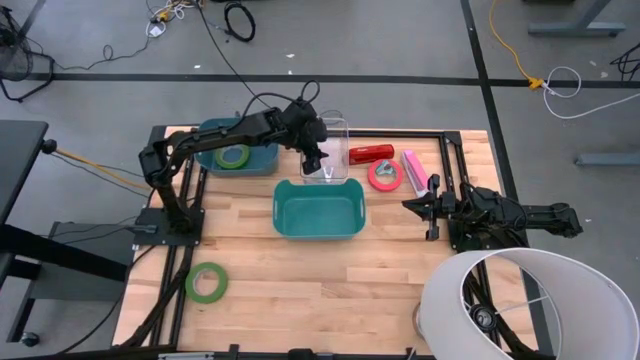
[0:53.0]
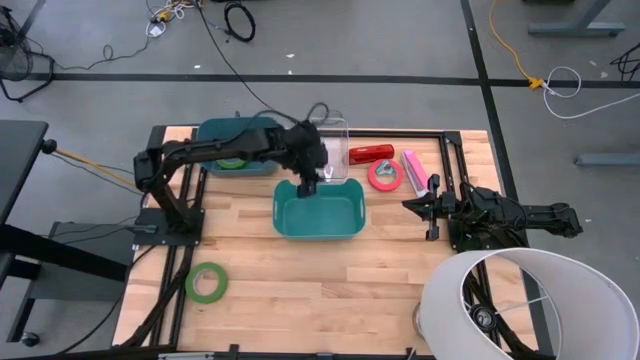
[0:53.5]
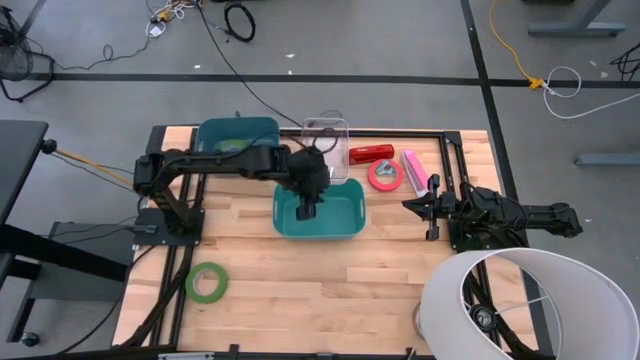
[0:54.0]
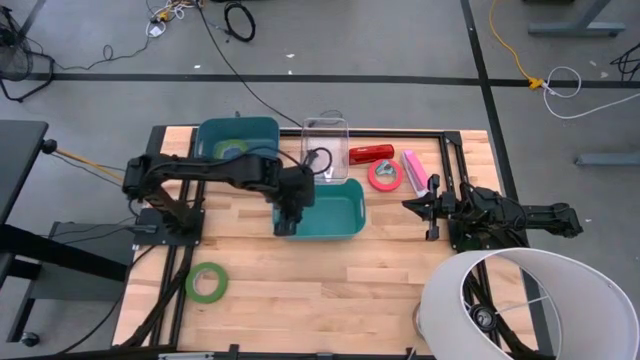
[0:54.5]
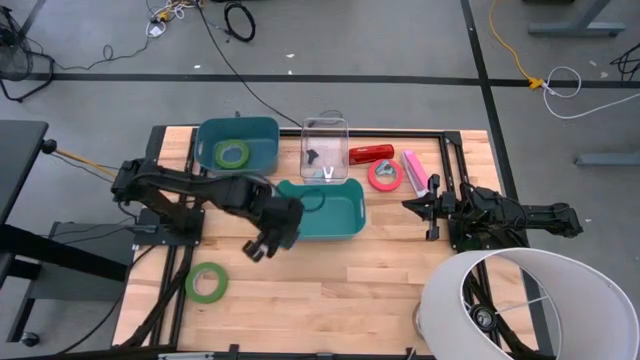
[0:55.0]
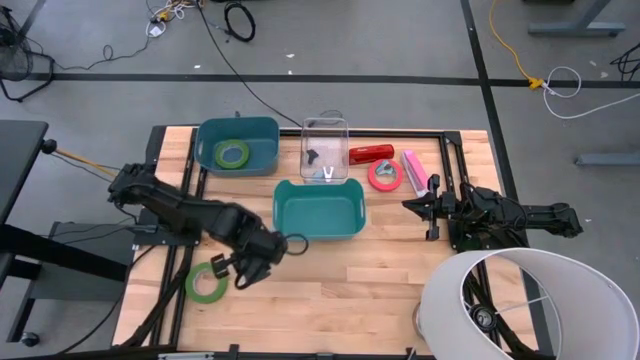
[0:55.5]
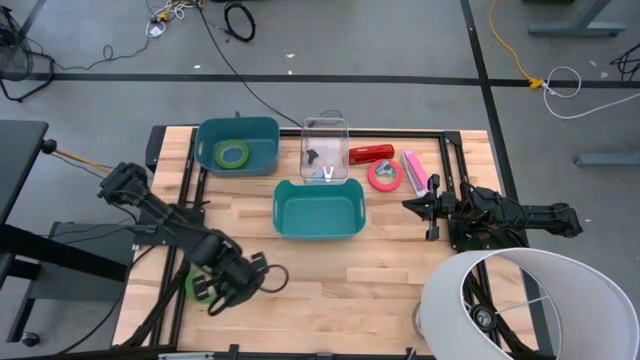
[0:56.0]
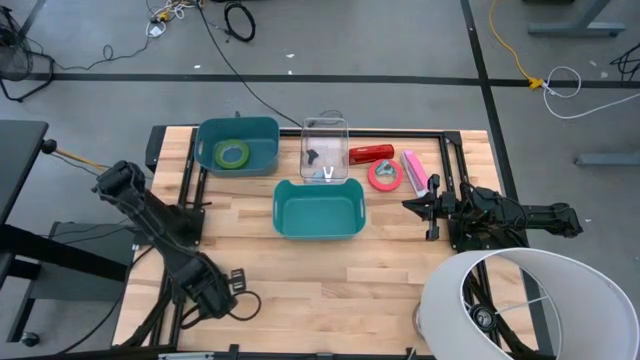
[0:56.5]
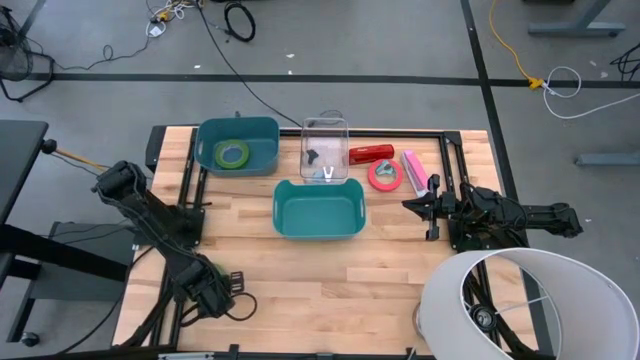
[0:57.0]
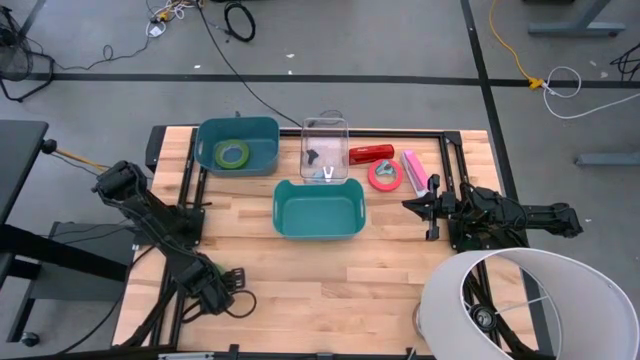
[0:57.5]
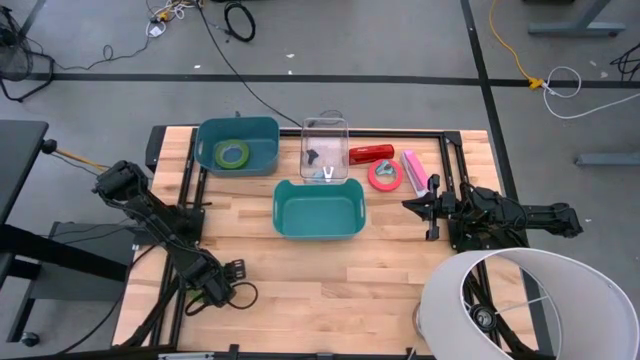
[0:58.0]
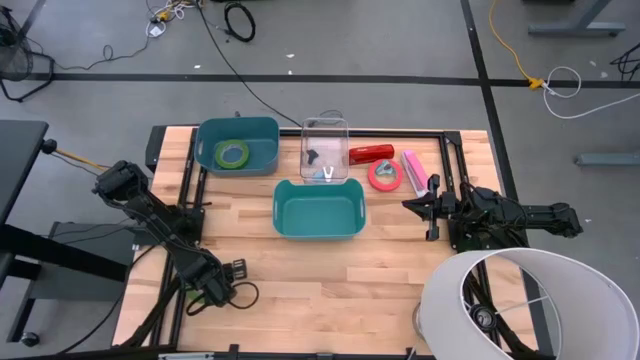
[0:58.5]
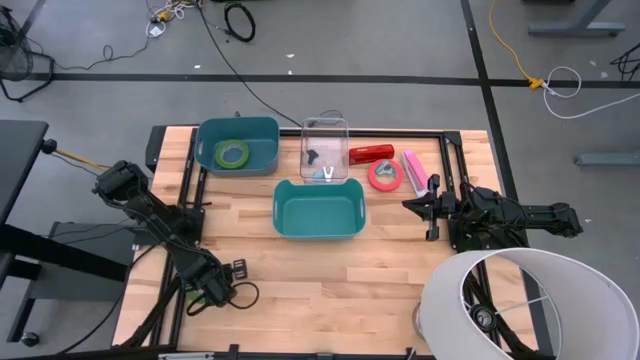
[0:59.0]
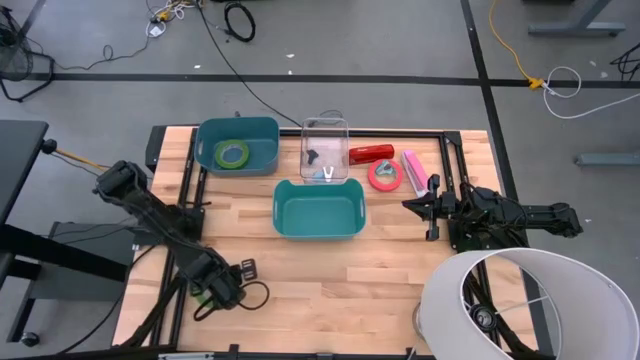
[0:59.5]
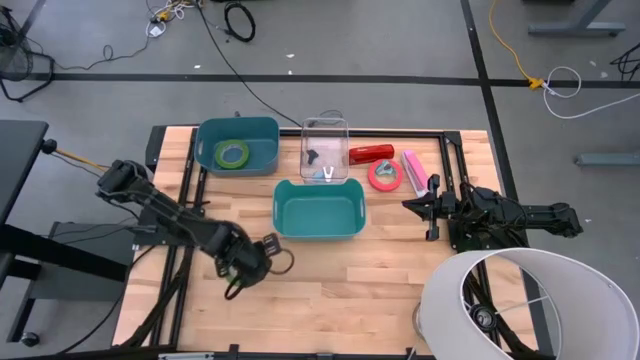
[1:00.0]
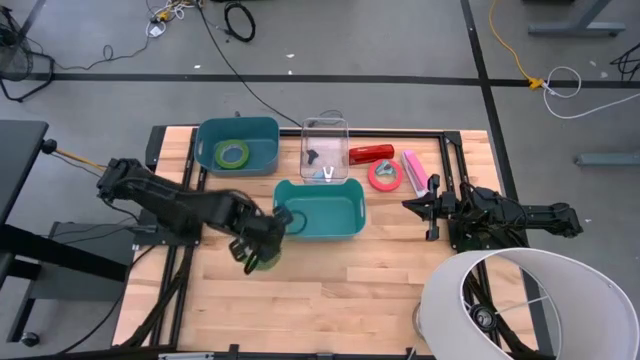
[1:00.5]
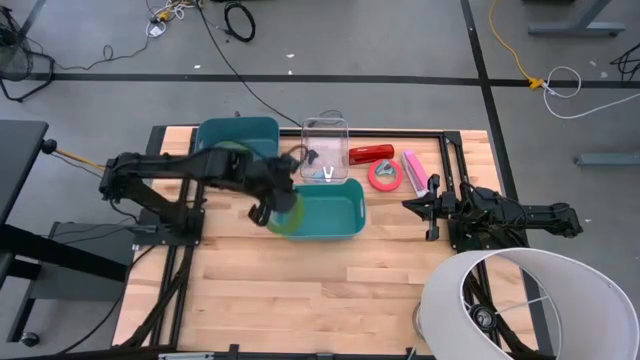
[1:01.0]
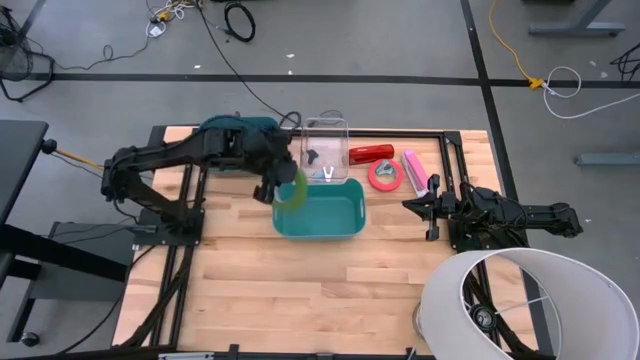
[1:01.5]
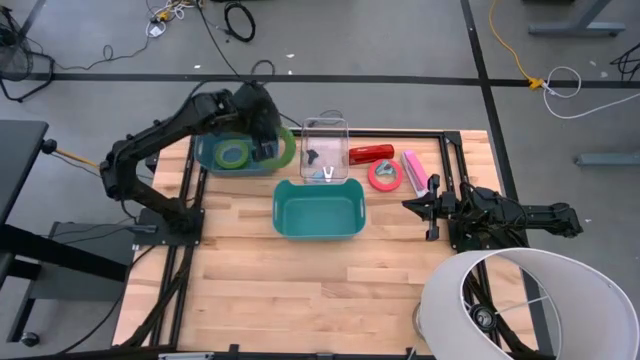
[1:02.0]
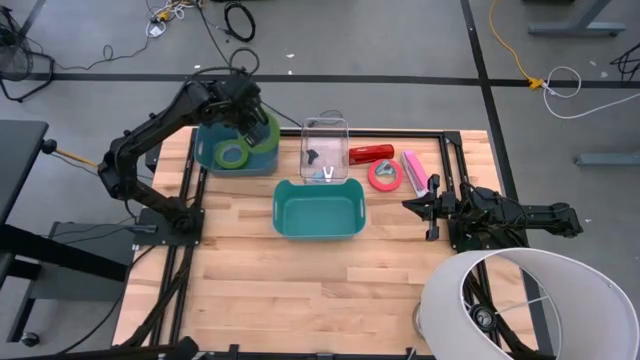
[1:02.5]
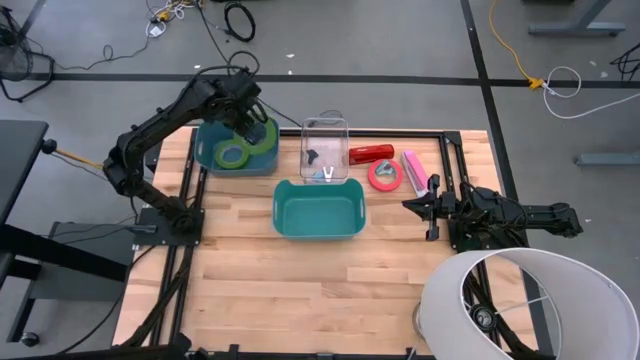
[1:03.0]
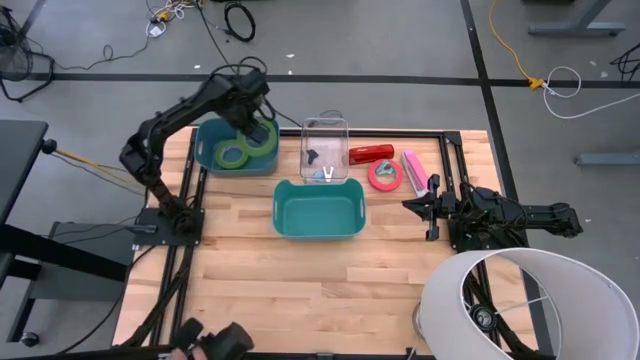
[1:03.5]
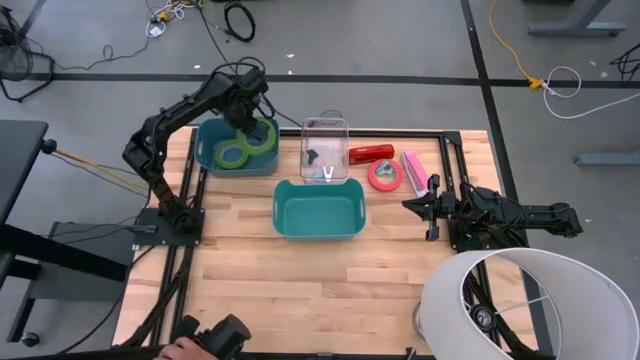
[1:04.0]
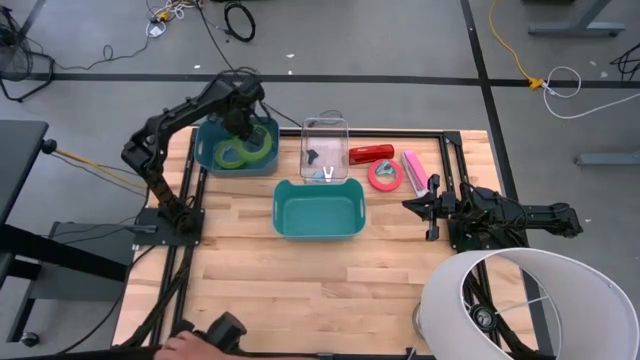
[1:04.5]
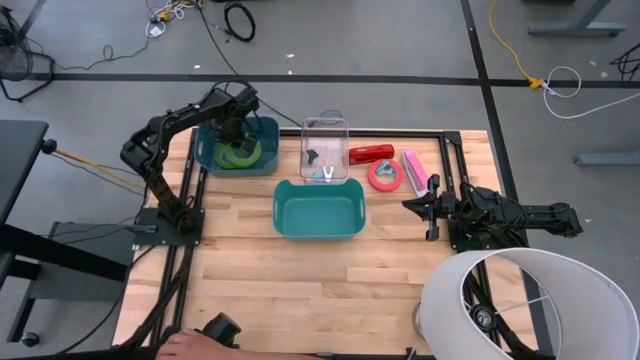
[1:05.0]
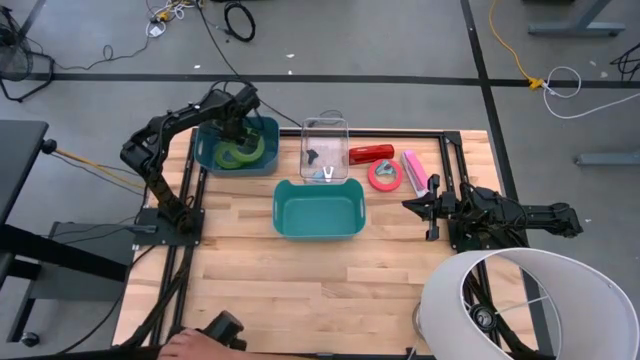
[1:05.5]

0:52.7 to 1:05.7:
Task: Pick and place Stapler, Stapler remover, tape
Put the green tape into the blue bin

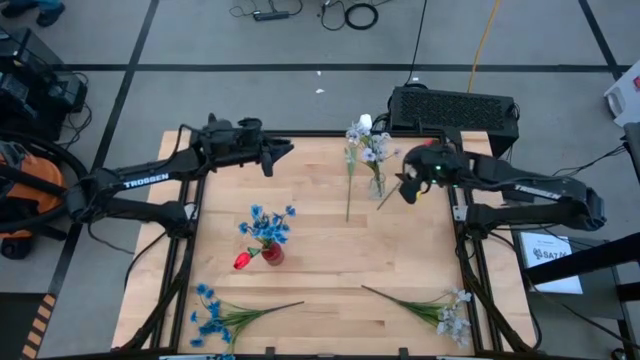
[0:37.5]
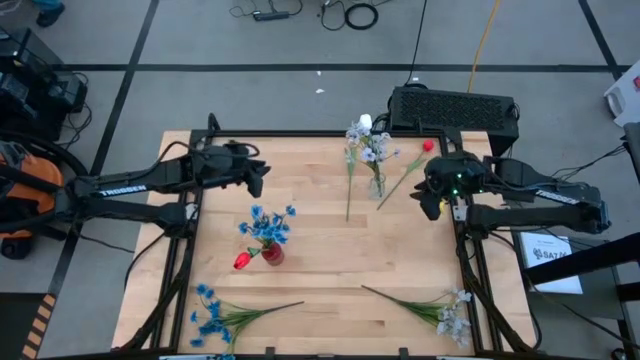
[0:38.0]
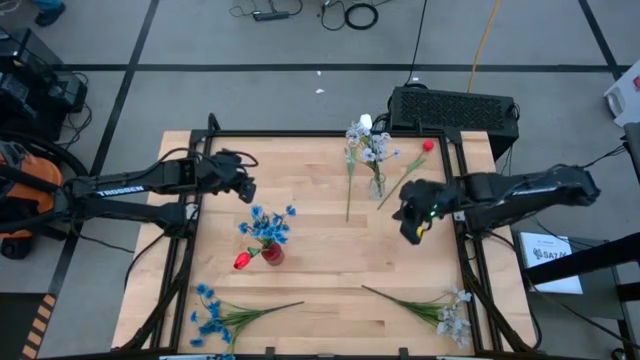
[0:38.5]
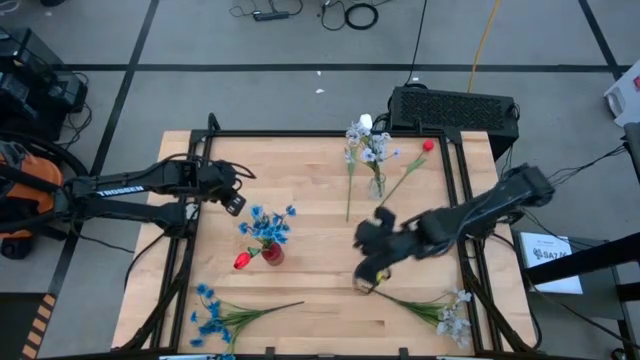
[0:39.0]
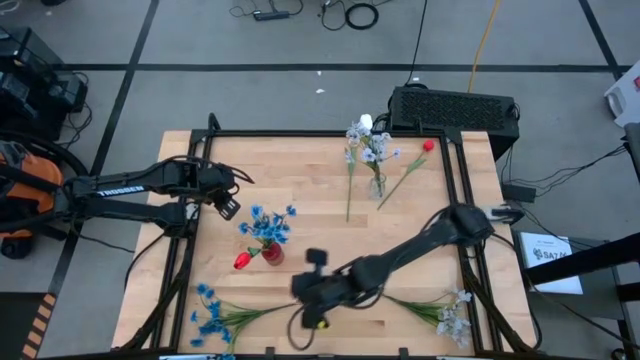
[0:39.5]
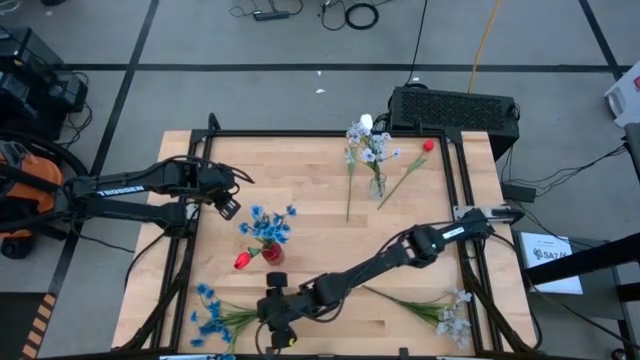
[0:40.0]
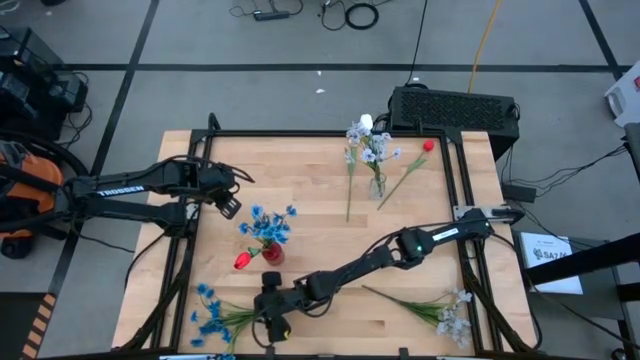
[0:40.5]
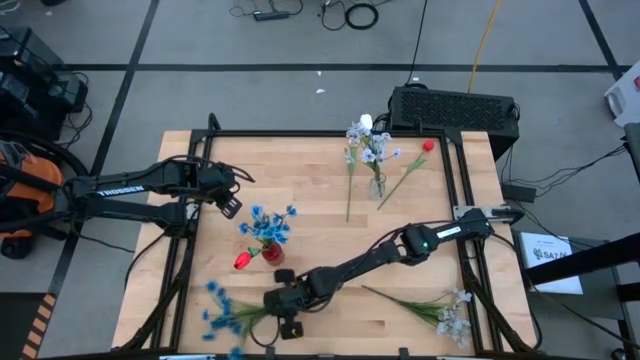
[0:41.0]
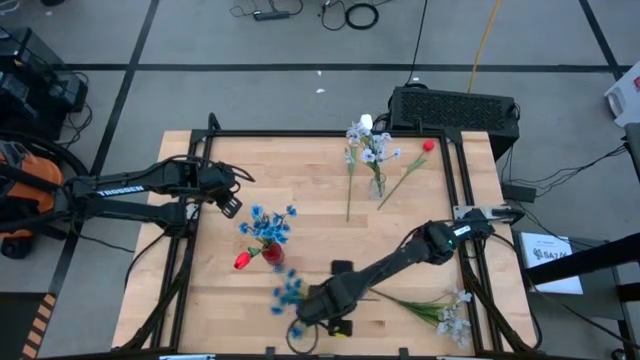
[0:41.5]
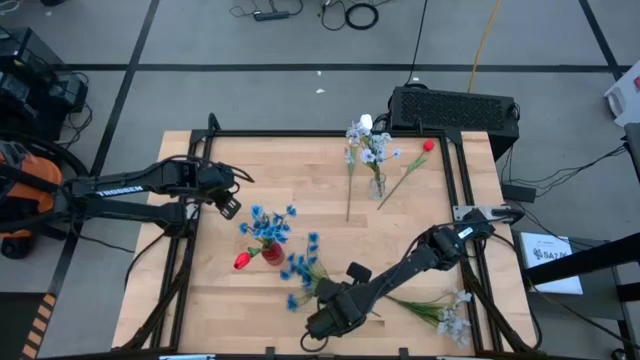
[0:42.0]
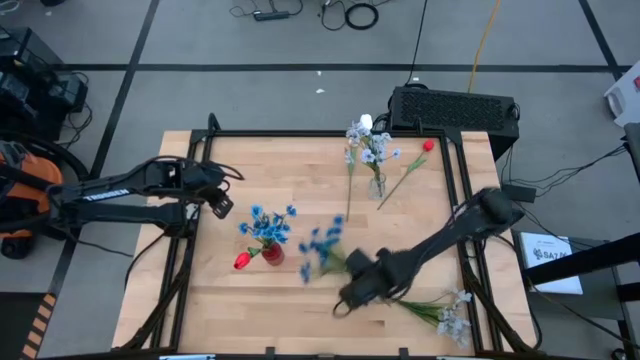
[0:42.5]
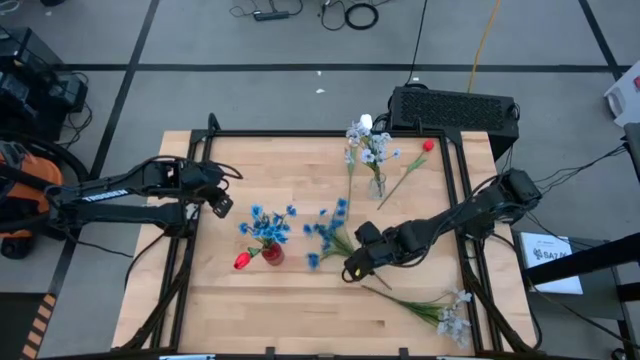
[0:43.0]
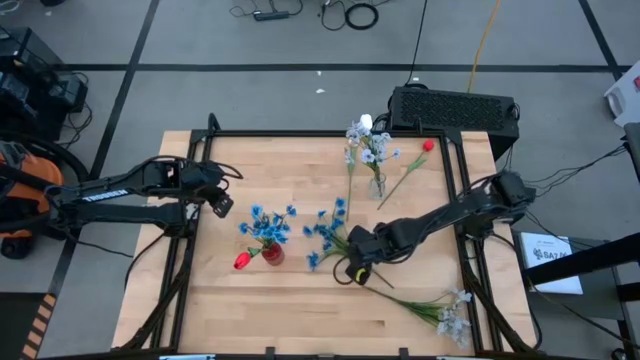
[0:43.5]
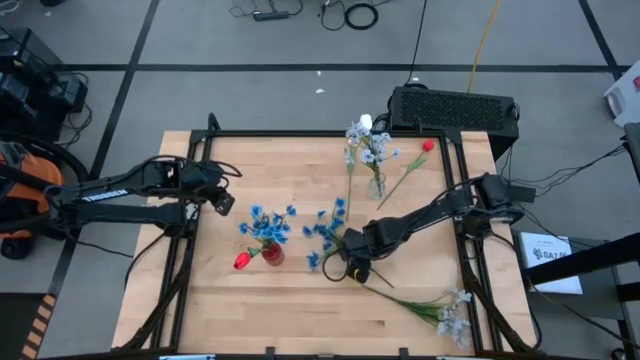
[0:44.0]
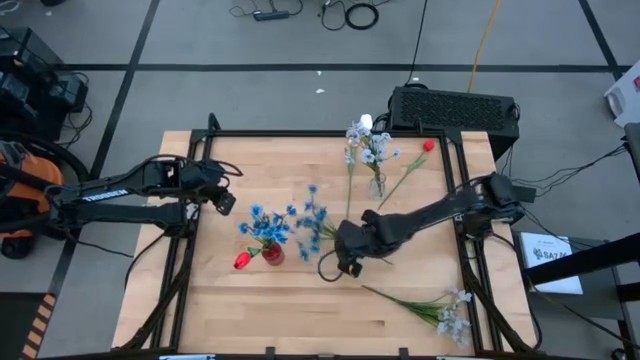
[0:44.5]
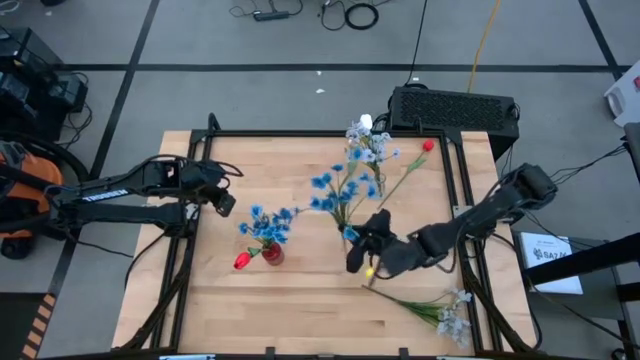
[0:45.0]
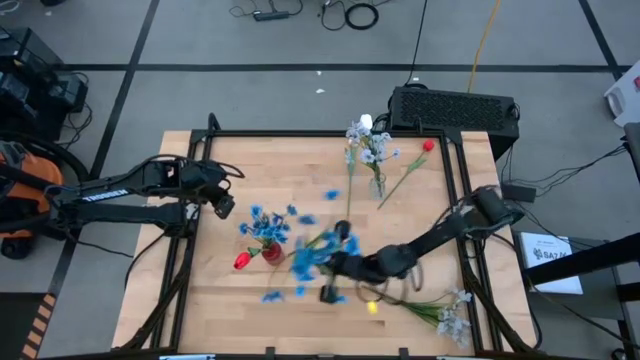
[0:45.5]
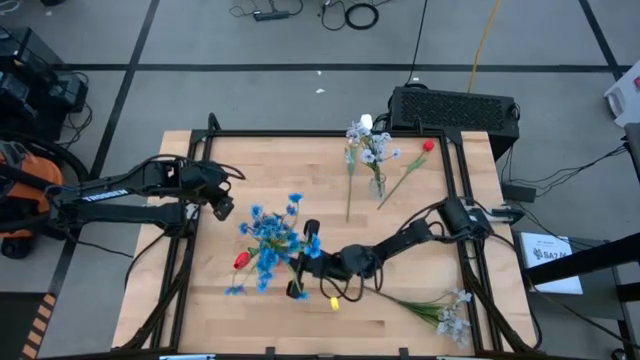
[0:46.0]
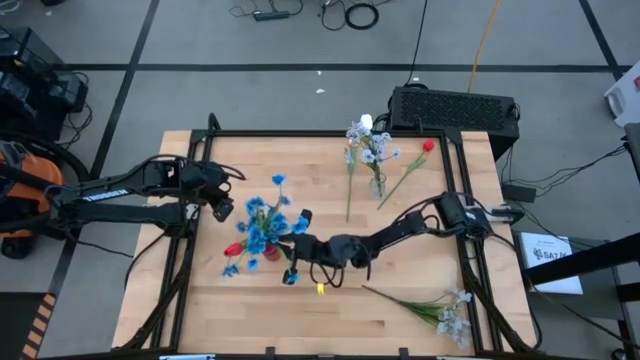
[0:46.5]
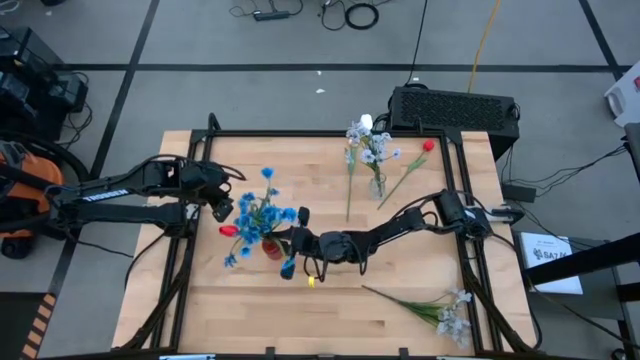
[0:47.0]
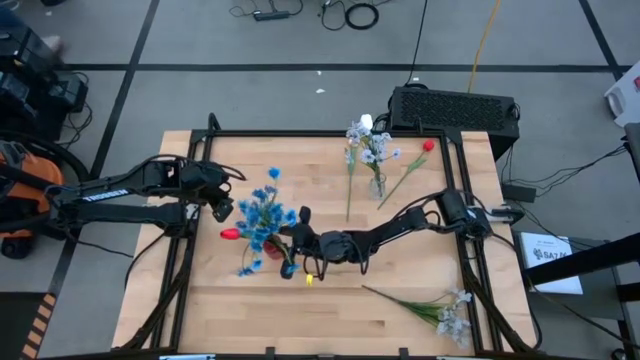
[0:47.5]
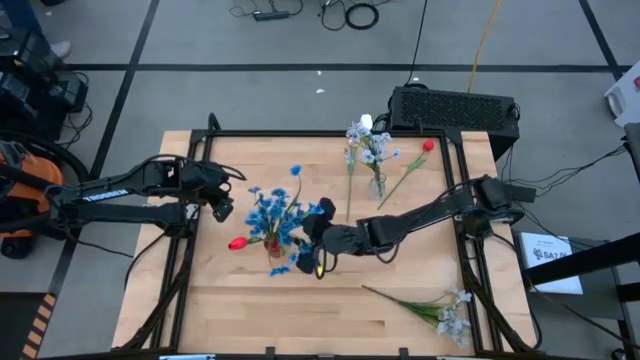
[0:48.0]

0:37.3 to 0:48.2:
Task: Sort flowers into vase by color
Put the blue flowers into the red vase
